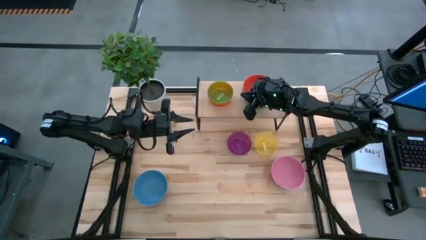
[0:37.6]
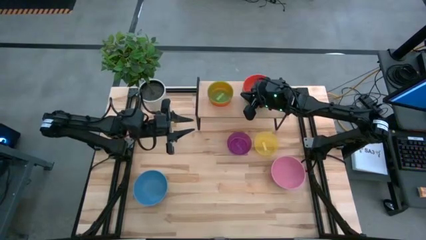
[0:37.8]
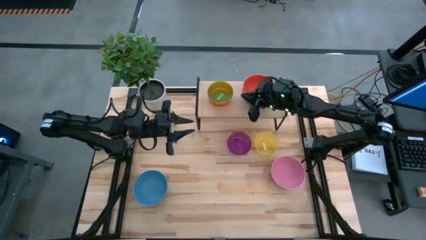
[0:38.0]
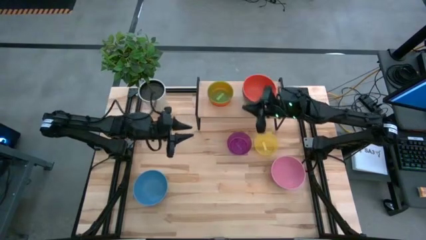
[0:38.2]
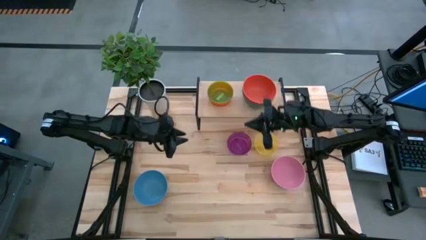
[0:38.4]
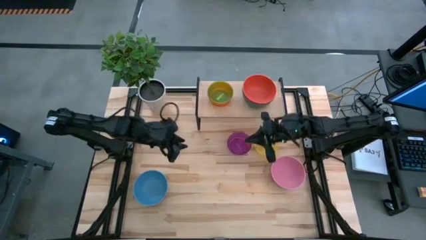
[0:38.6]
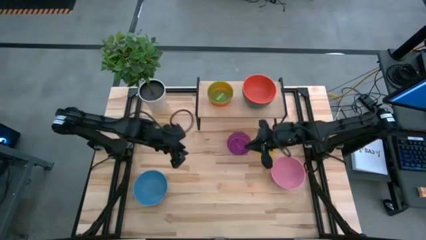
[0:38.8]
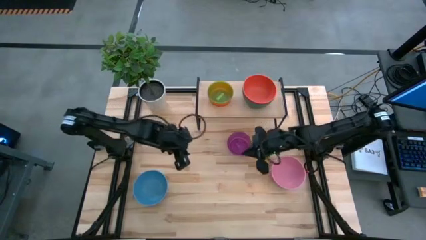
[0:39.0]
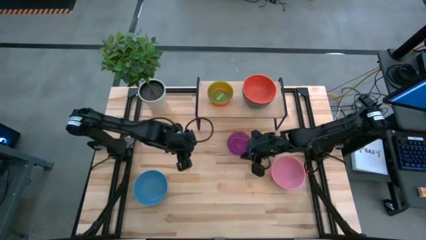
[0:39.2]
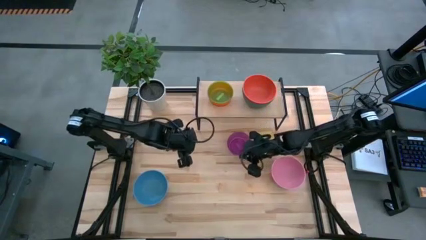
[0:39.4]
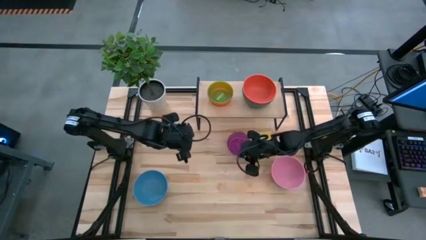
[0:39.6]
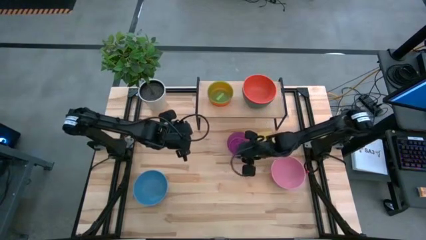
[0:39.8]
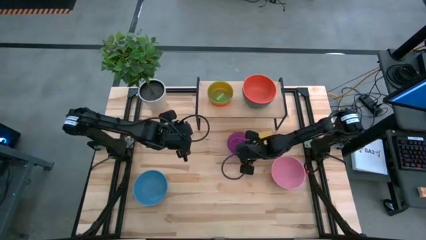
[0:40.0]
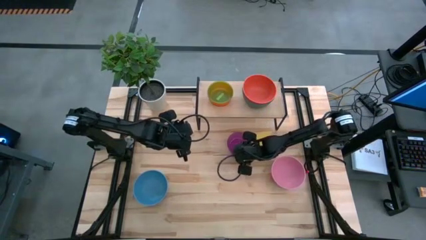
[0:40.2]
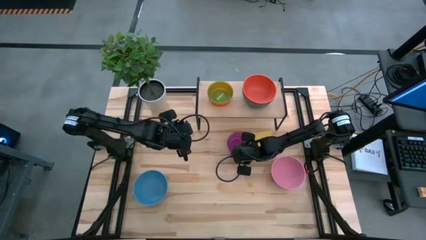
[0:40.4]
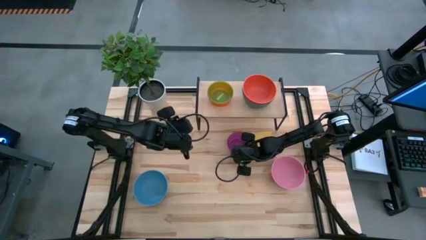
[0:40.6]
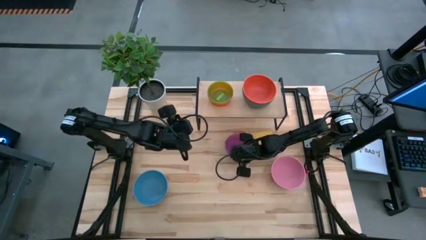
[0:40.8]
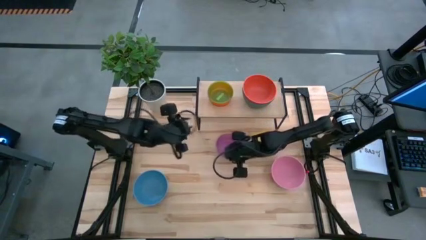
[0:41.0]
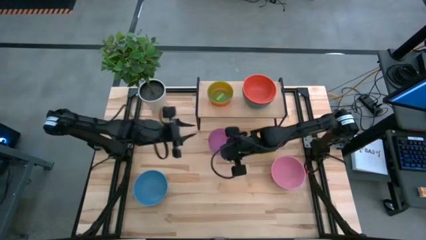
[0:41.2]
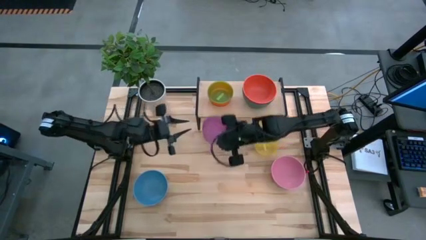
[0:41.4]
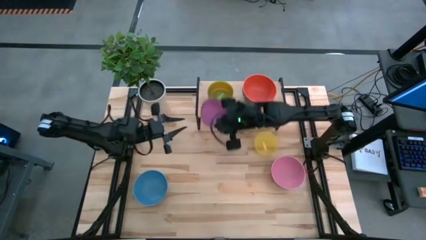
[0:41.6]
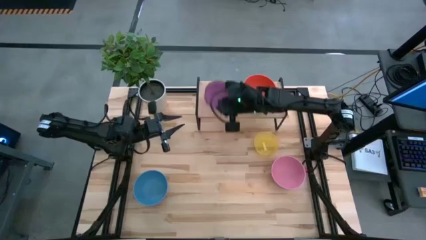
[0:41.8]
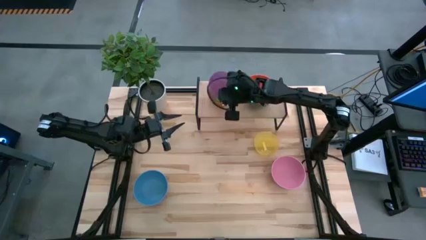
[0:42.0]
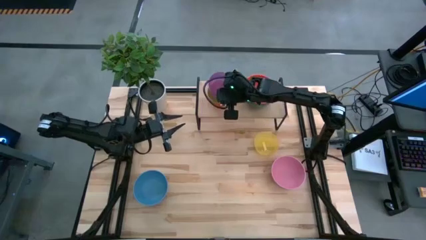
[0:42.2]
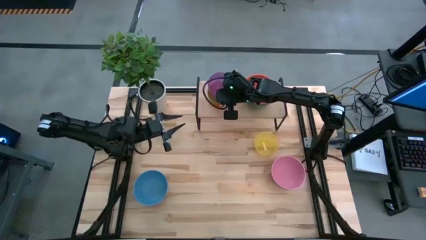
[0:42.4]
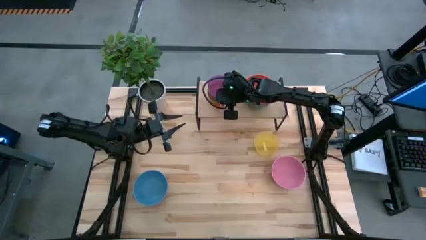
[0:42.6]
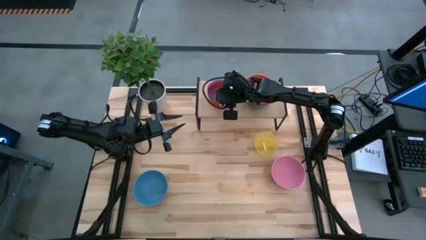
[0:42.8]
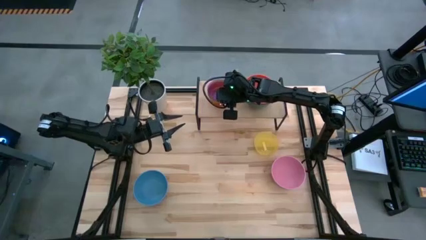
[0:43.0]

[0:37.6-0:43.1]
Task: Place and stack bowls onto a shelf
Stack the small purple bowl on top of the small green bowl on the shelf

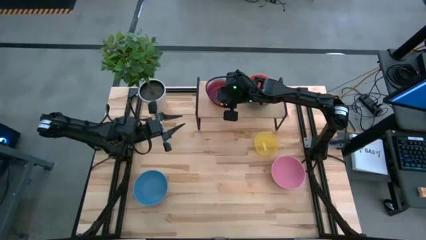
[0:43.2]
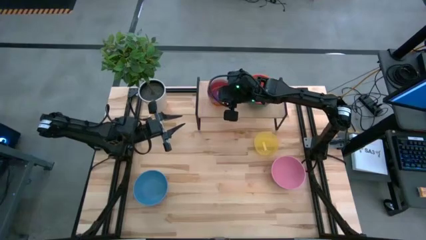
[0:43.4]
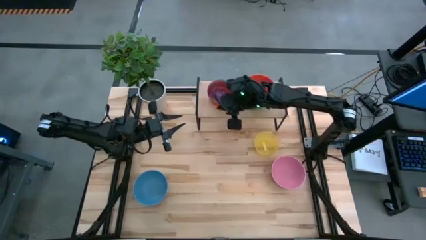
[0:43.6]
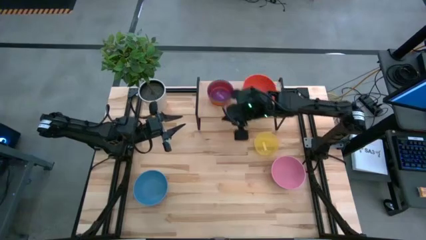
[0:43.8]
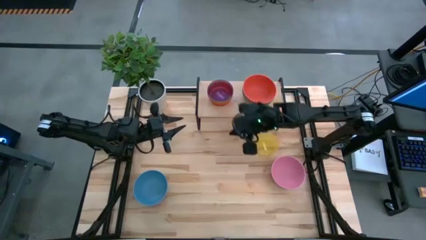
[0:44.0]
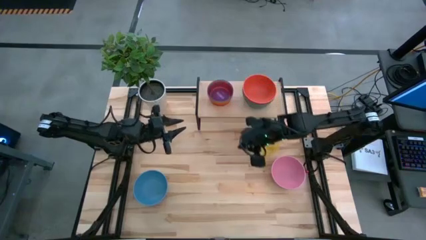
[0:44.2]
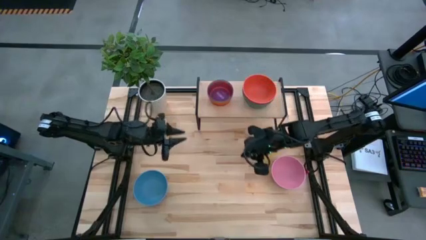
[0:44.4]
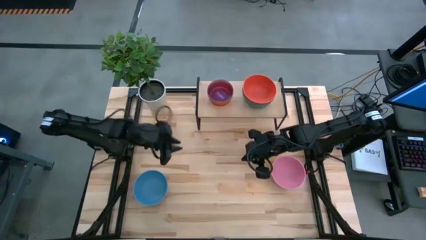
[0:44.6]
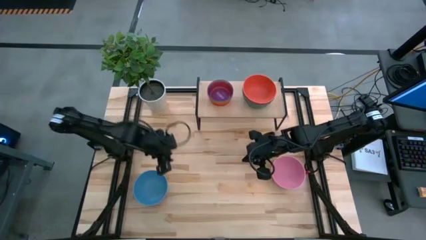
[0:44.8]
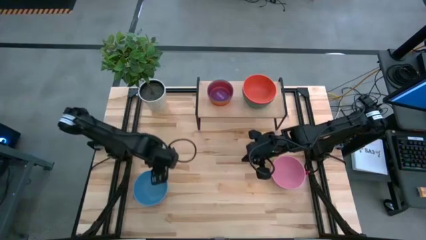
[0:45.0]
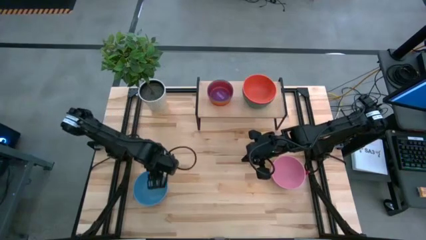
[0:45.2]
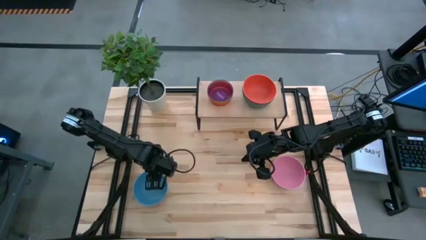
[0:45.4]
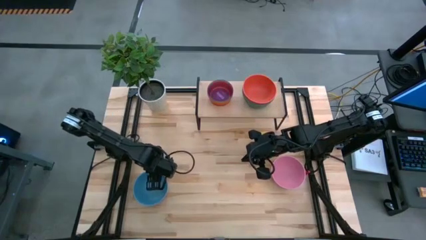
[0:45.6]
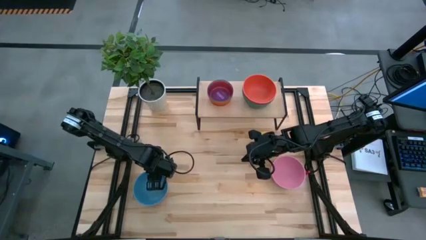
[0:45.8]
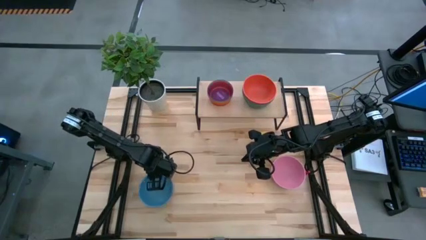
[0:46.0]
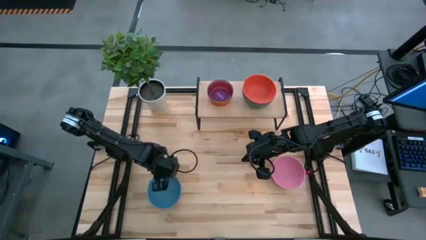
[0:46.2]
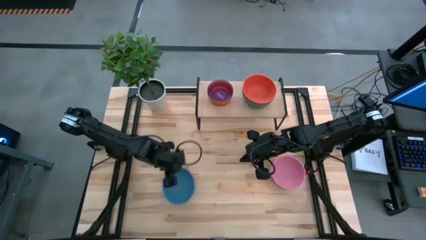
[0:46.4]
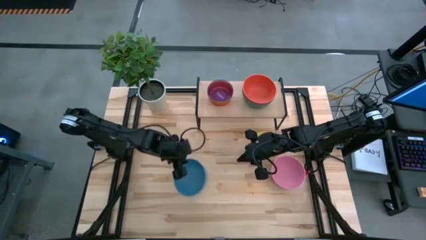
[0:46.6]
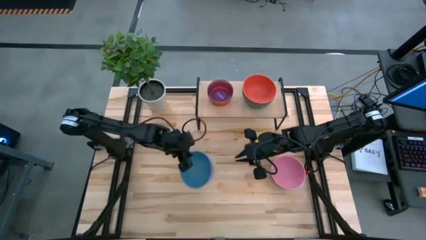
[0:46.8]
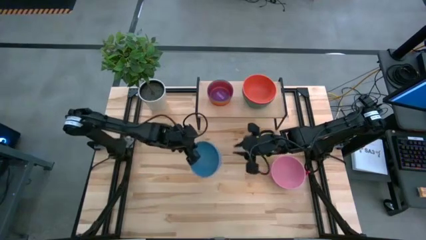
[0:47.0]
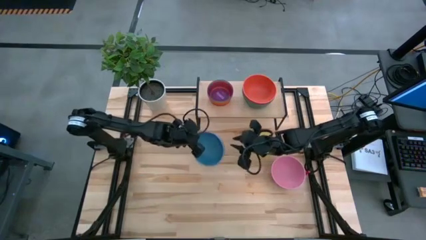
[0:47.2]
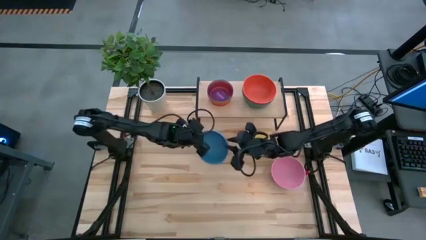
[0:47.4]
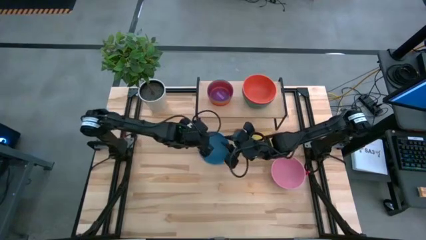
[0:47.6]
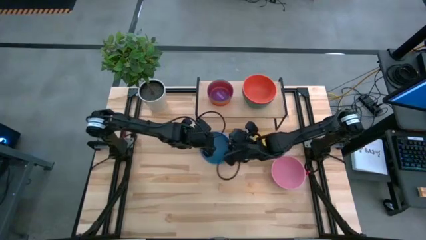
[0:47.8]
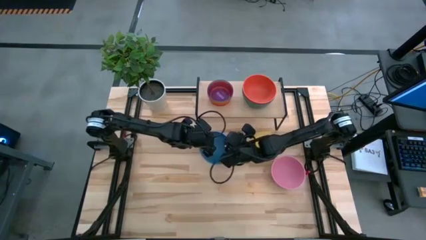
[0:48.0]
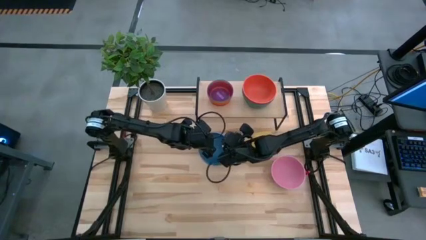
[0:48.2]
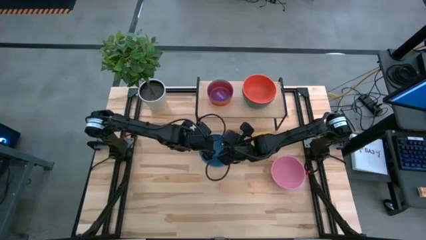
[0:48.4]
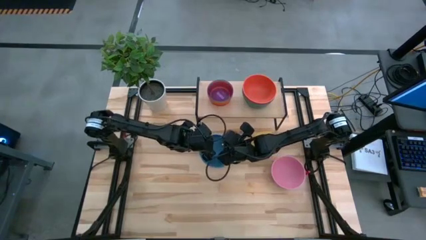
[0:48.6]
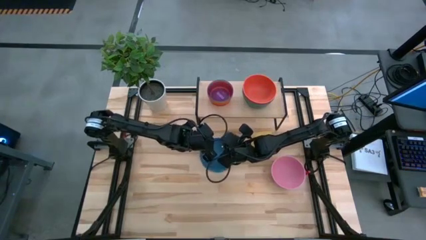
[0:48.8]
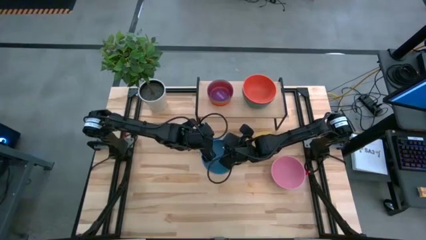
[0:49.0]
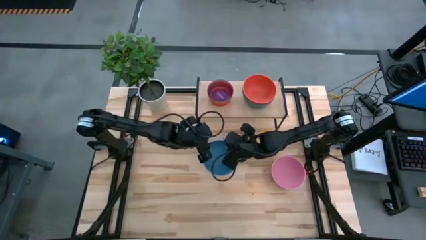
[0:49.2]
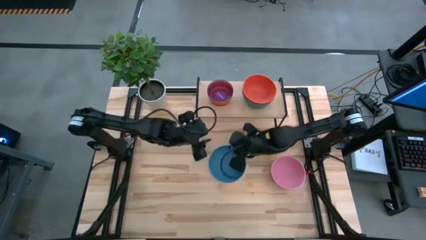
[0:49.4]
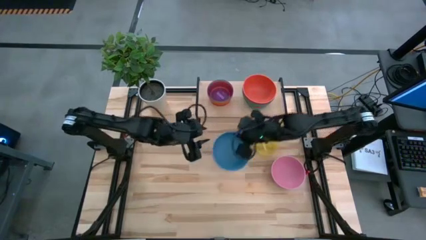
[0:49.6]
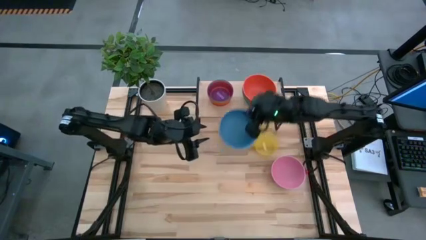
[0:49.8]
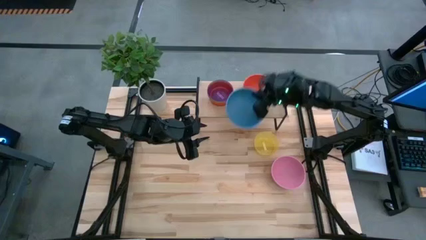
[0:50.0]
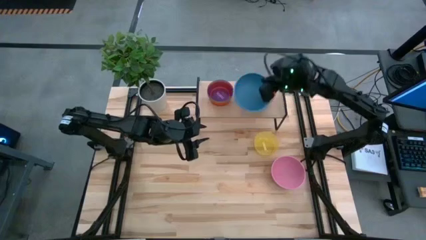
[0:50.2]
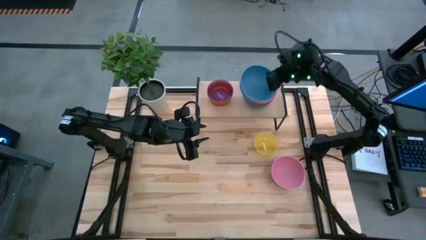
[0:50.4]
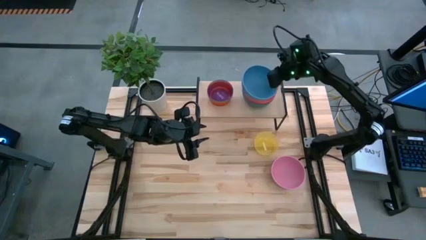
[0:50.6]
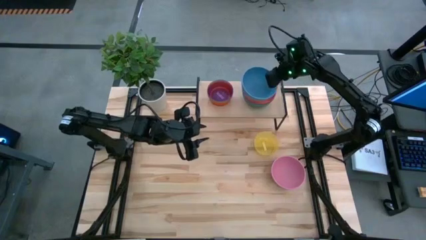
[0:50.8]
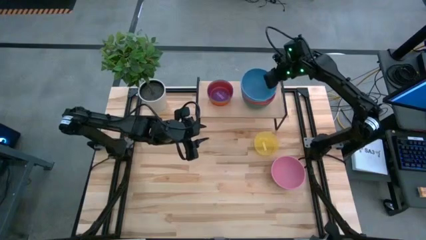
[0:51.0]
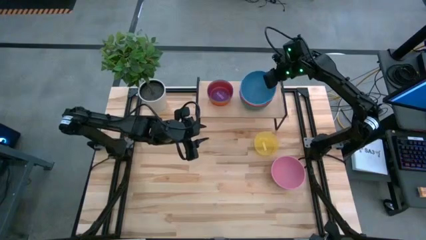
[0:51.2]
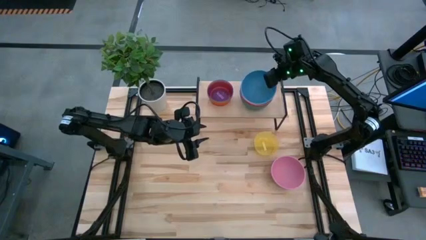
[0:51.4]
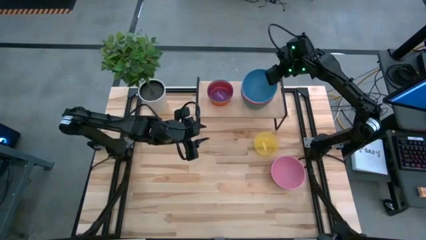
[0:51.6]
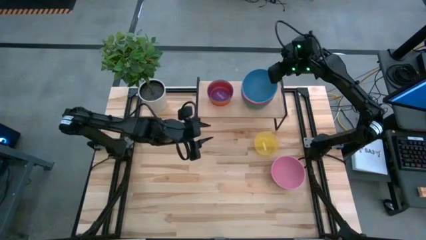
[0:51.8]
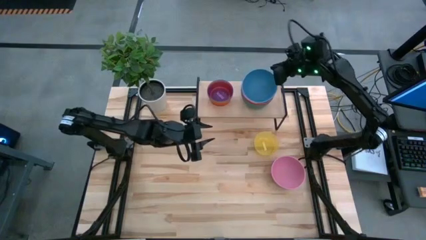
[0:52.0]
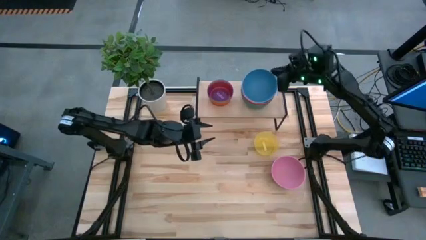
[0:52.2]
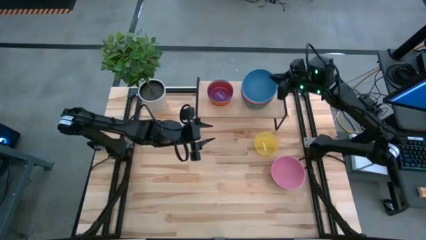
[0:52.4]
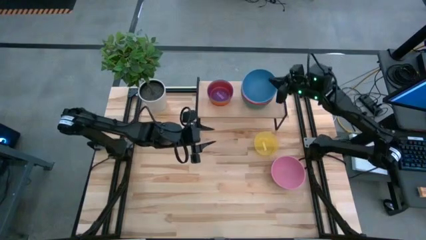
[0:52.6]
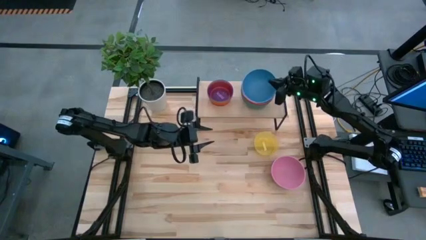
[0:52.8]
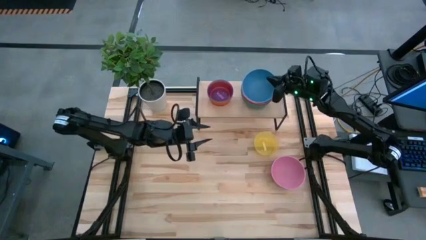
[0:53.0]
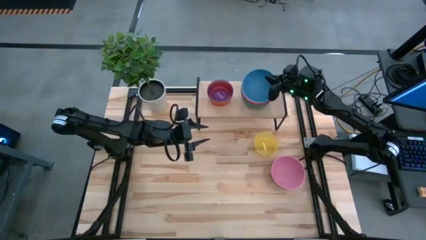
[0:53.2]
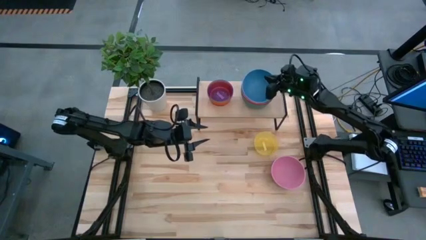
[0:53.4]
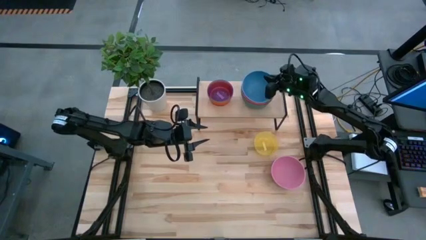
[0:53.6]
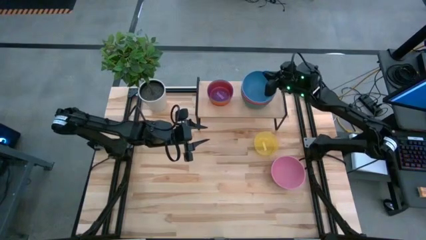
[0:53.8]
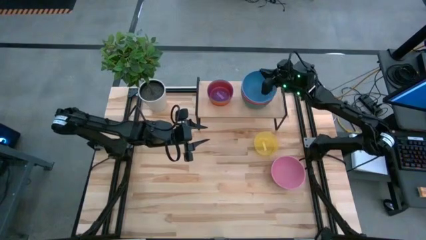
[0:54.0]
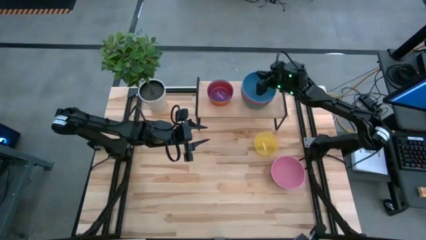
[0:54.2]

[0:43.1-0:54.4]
Stack the large blue bowl on top of the large orange bowl on the shelf
